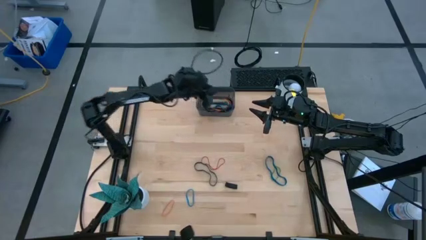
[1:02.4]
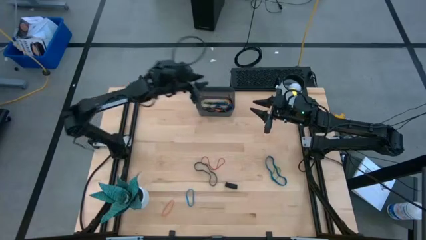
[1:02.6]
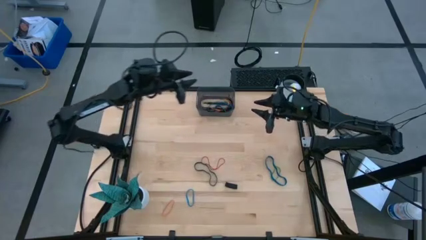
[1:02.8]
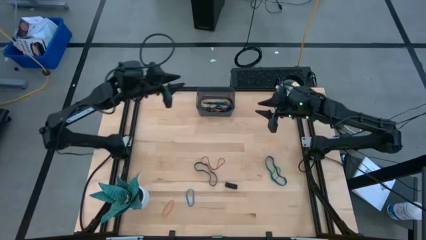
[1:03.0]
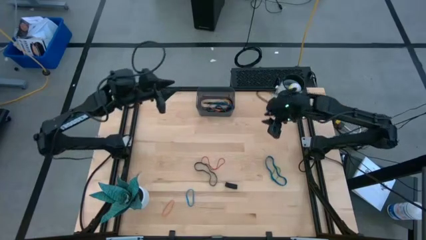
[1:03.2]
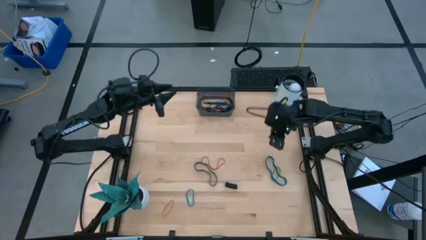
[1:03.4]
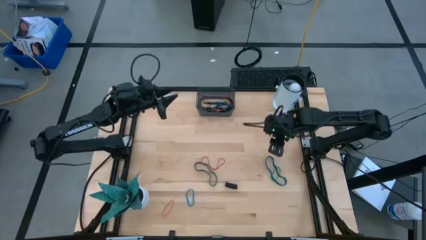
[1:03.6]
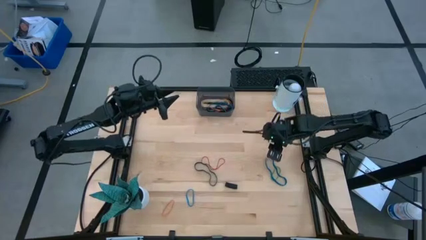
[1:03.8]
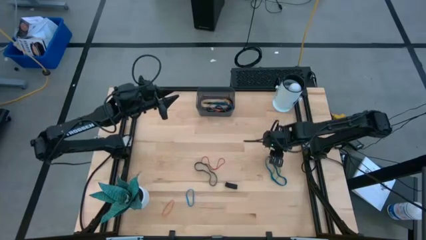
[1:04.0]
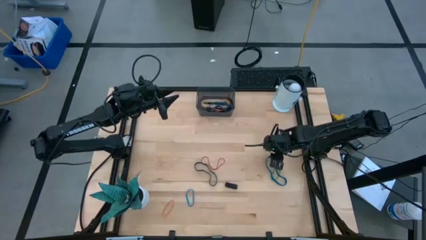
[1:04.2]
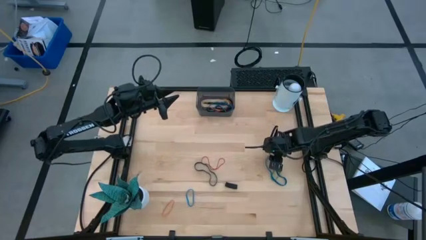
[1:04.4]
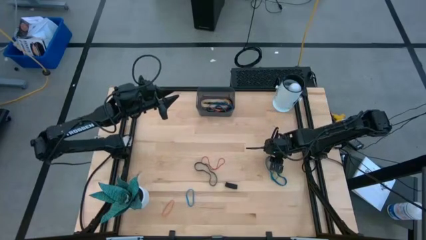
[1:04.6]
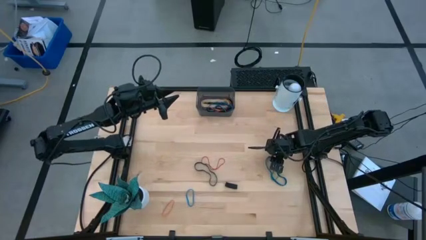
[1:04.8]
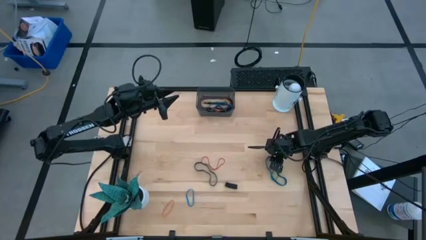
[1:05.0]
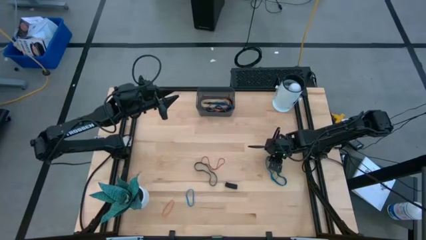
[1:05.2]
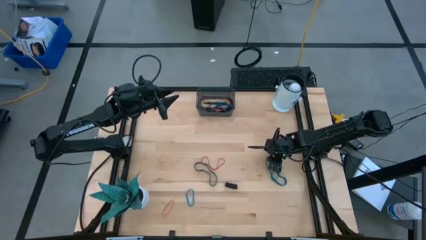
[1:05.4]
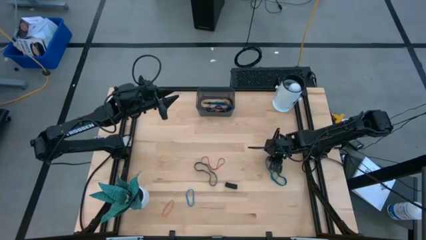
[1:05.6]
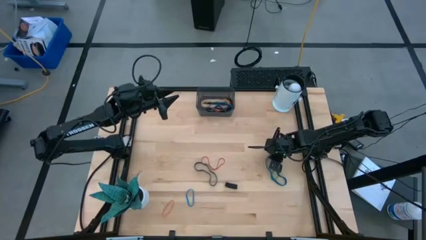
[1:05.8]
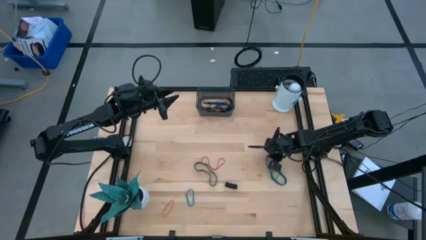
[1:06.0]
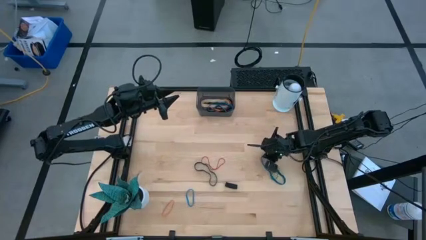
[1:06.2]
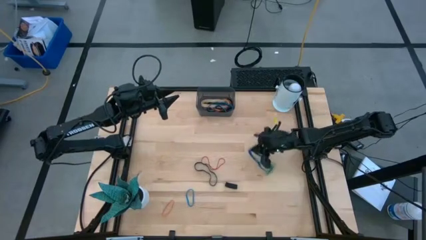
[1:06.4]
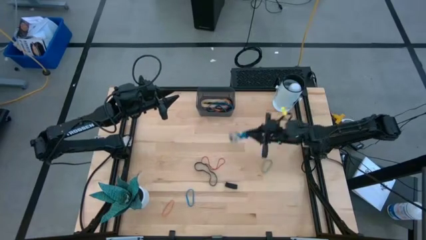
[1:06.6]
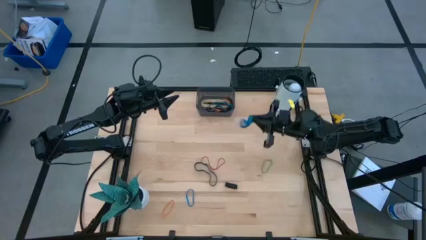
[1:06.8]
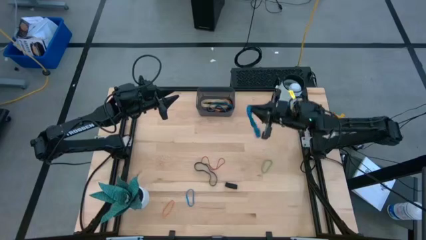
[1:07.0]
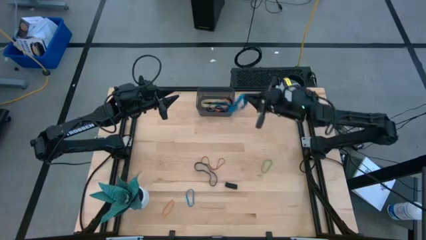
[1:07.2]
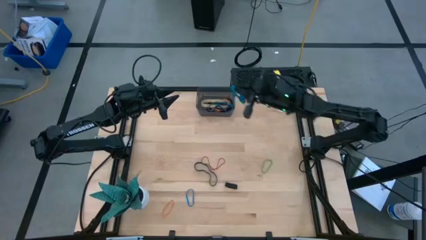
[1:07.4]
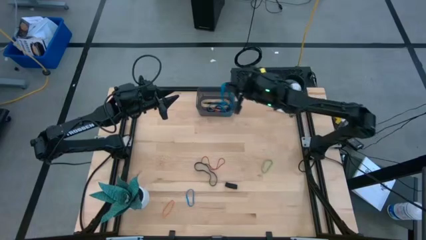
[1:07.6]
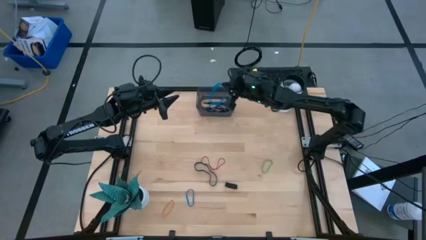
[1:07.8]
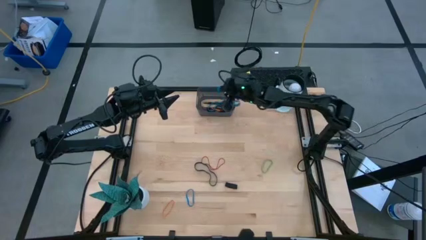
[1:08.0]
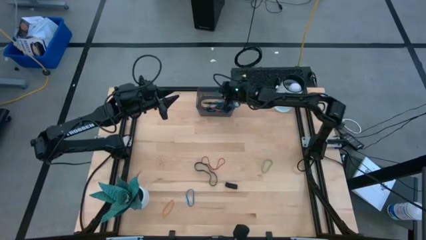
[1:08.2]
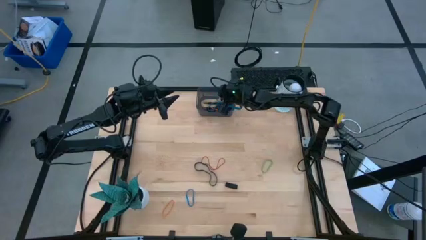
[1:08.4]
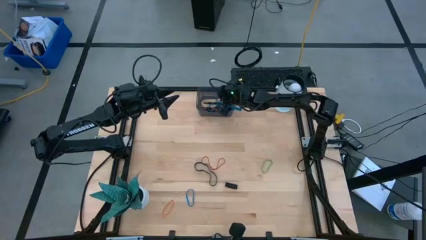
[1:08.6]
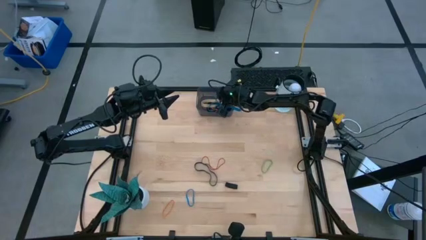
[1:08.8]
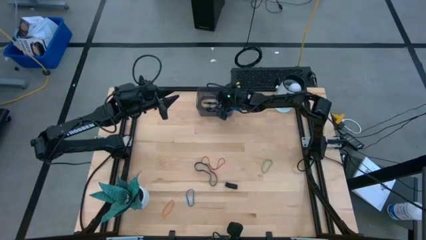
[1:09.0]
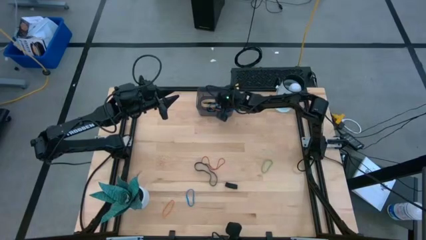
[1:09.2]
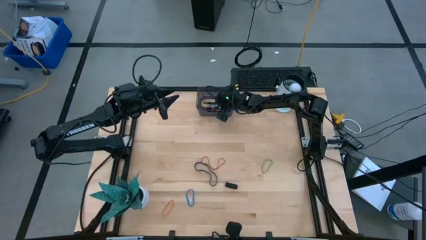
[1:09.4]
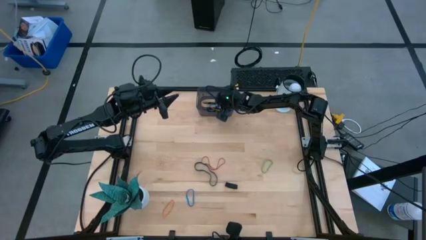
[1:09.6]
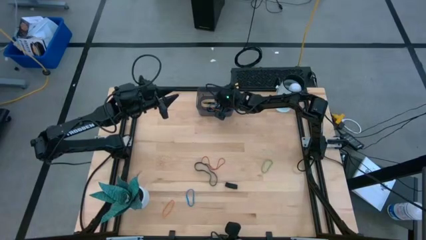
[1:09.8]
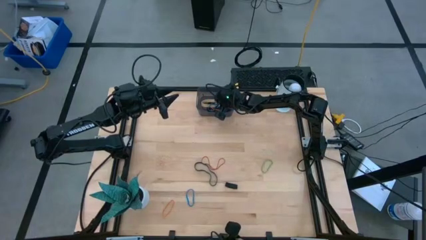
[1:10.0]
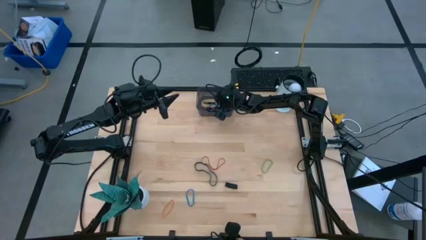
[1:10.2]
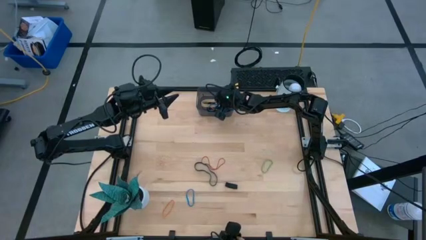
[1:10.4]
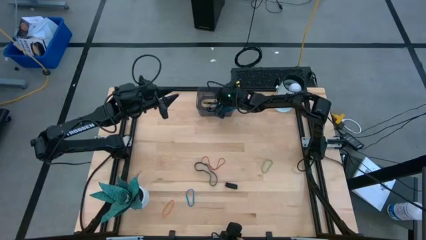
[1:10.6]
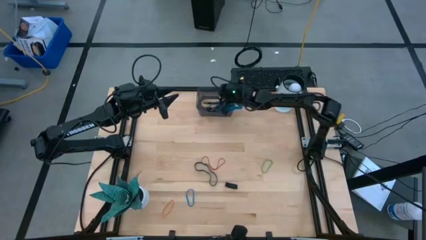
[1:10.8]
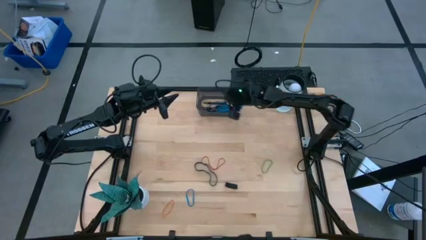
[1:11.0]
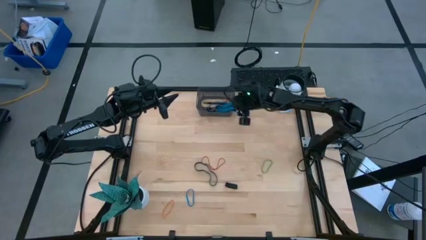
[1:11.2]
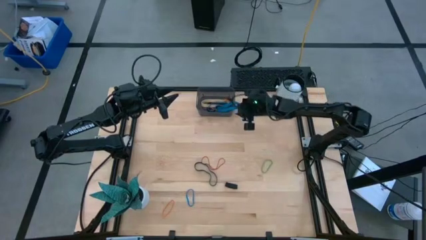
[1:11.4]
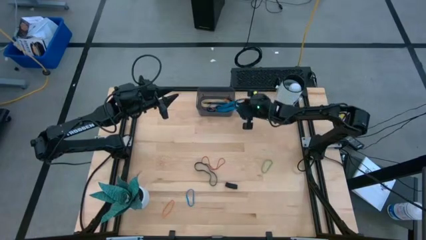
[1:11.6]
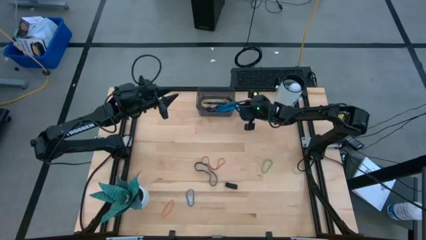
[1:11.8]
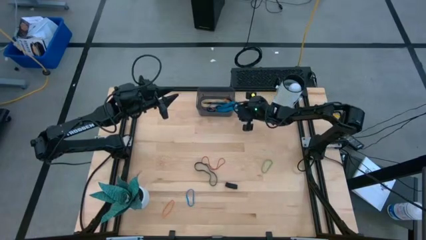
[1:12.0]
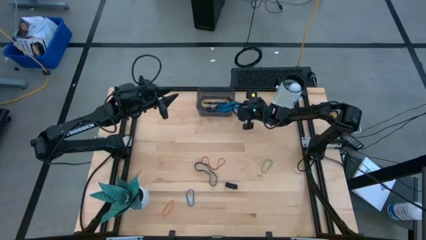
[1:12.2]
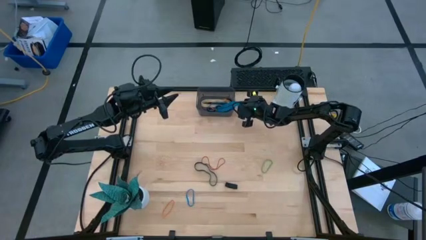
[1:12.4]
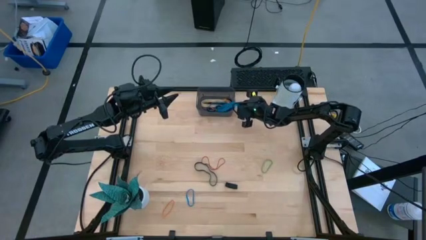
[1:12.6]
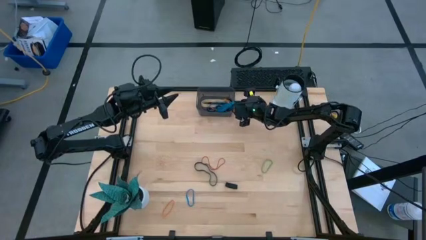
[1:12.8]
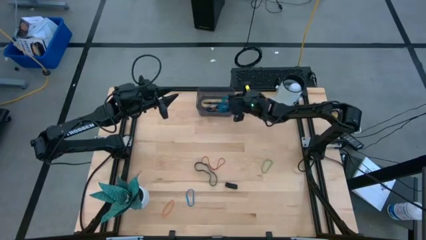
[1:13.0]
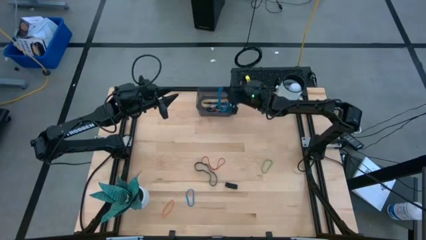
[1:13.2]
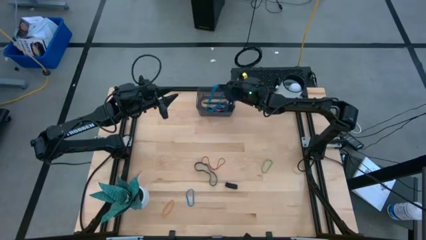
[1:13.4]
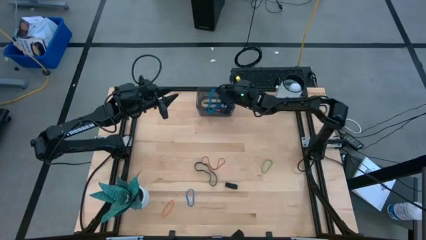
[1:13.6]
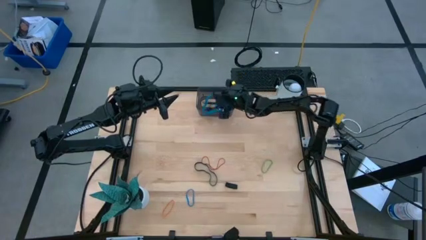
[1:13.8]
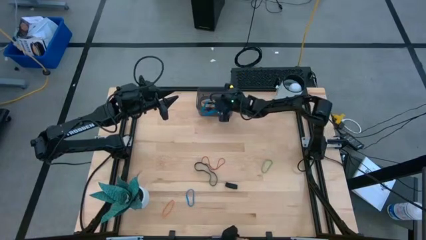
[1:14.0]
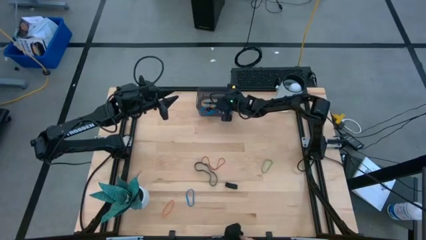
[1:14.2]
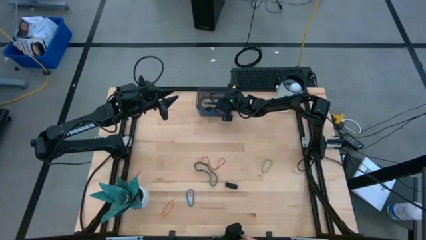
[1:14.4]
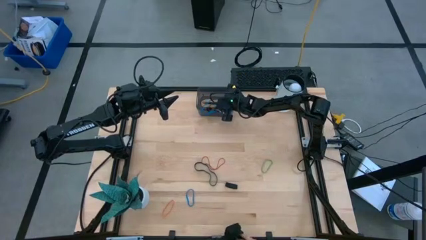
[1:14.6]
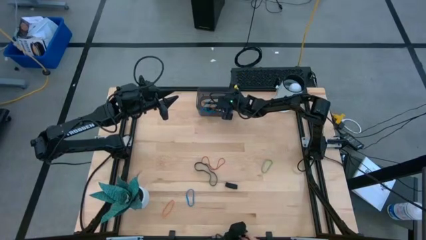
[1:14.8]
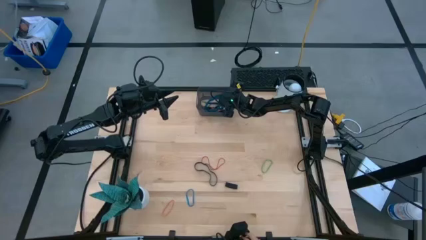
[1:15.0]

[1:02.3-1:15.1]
Task: Pick and place rubber bands into bin
Put the top blue rubber band into the black bin
